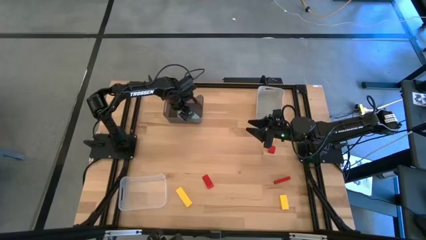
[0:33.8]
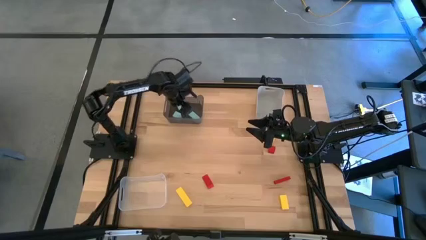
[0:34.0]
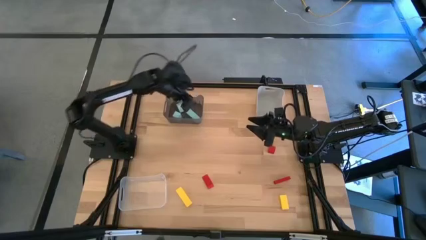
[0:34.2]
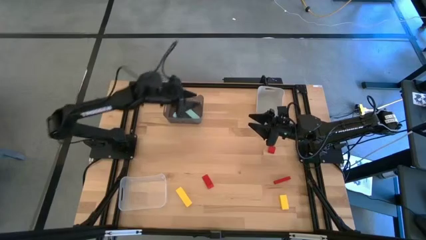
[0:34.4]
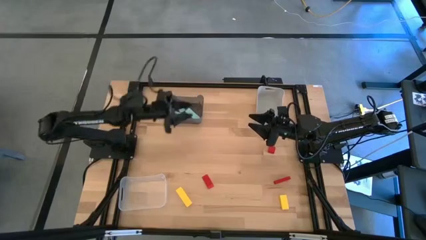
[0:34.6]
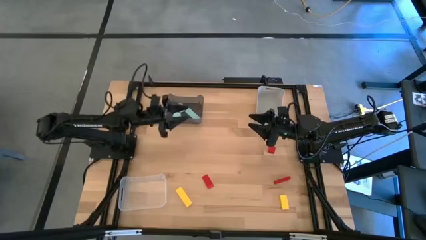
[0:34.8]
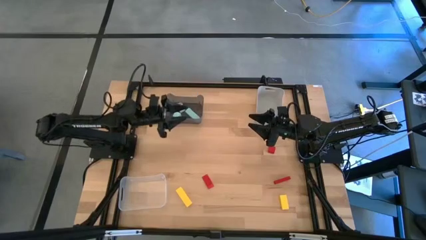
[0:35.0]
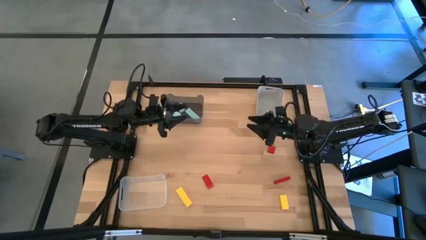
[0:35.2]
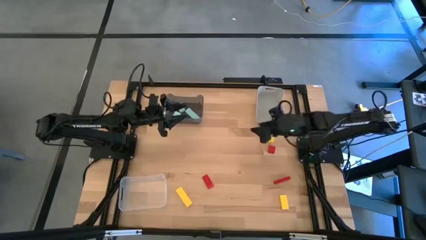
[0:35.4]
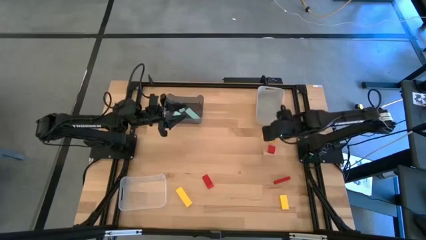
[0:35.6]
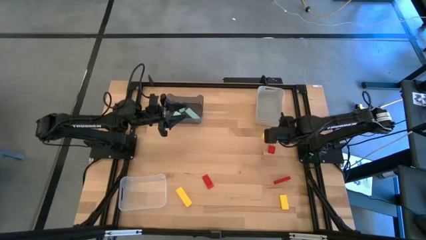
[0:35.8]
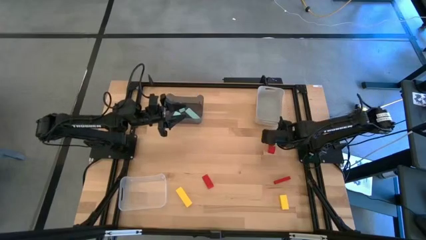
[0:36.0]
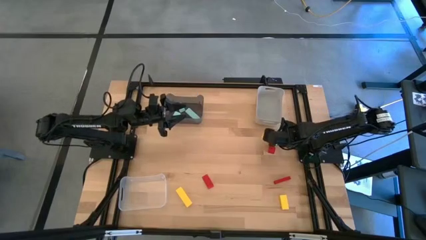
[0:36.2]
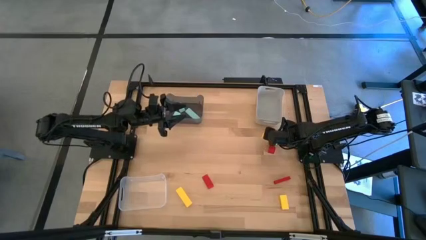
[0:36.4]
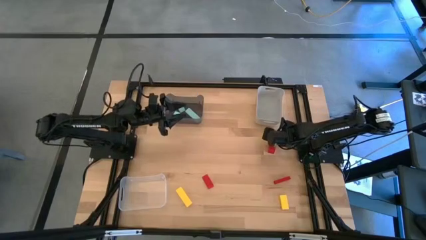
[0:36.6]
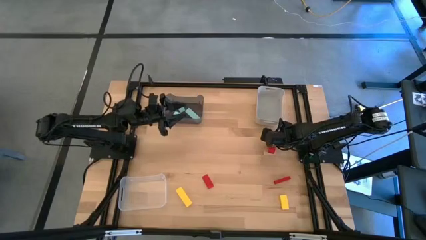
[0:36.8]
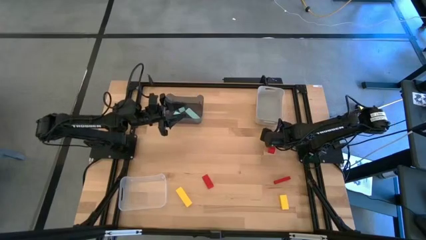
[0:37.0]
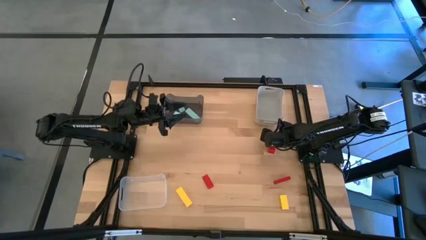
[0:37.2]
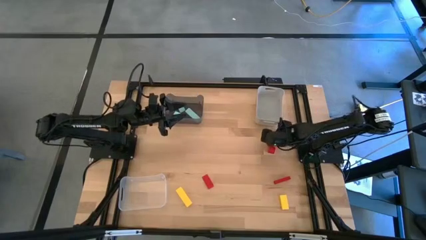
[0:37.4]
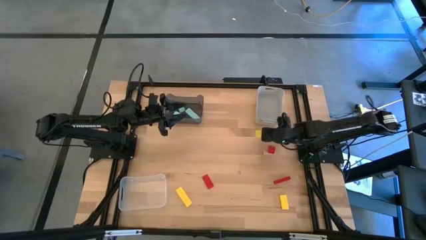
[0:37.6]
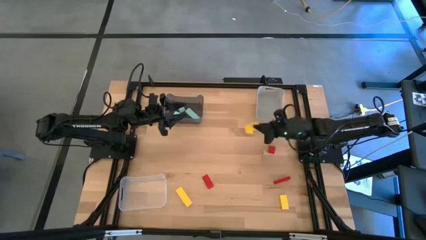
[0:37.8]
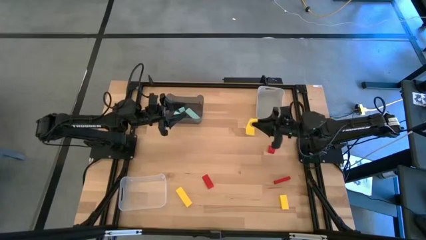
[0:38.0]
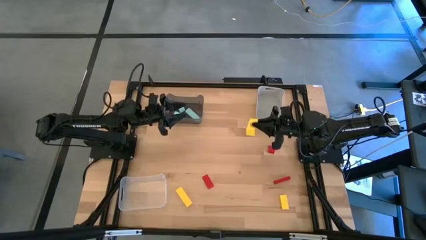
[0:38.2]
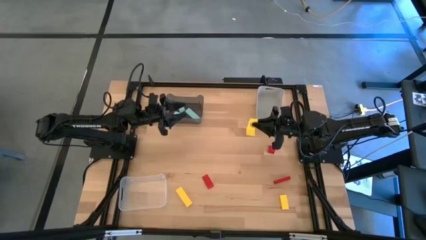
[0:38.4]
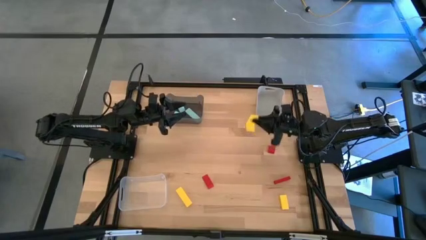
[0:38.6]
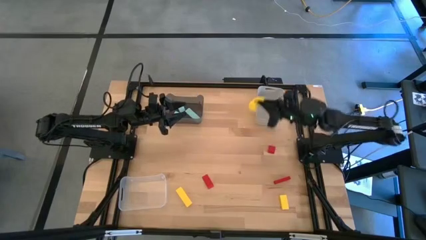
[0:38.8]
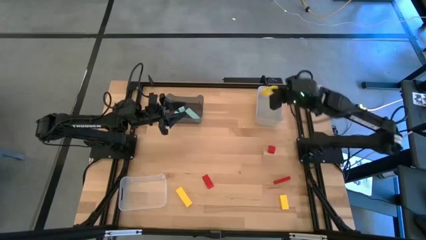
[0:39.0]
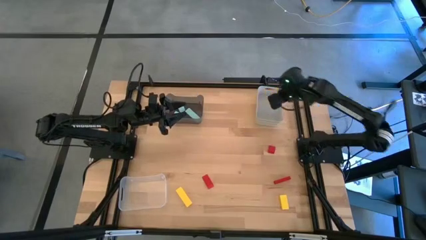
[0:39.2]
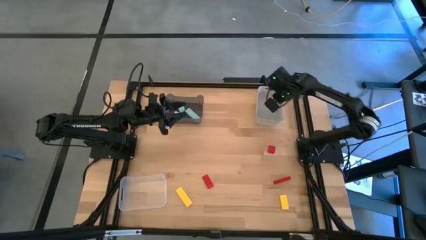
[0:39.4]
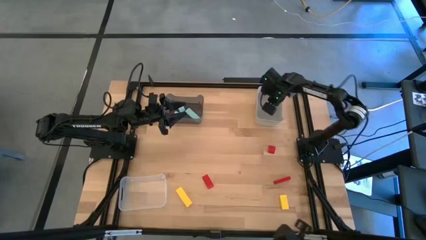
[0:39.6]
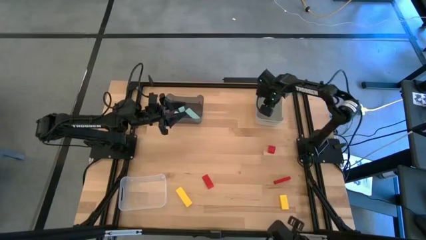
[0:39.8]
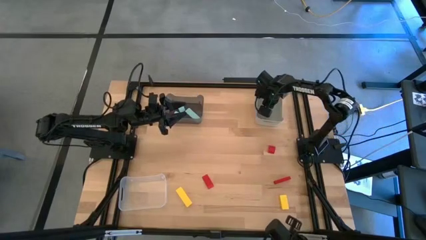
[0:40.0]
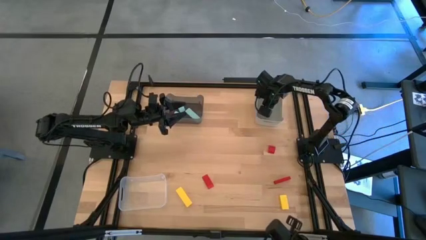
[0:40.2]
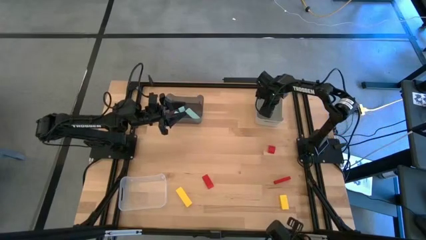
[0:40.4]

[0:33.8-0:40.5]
Task: Sort & place blocks by color
Put the top yellow block into the gray bin

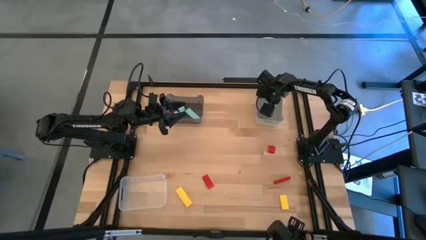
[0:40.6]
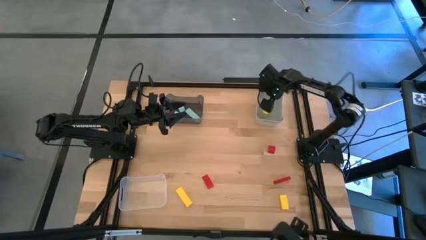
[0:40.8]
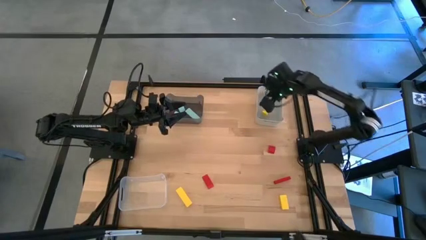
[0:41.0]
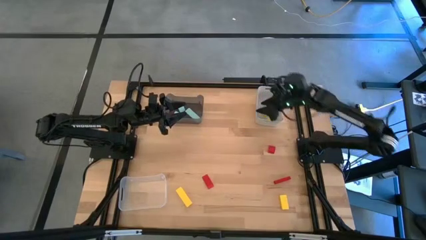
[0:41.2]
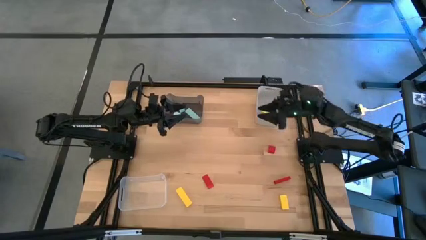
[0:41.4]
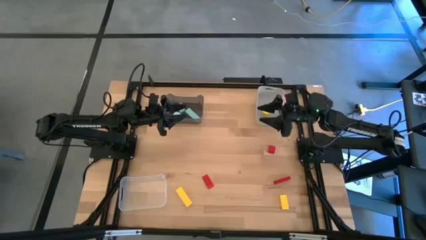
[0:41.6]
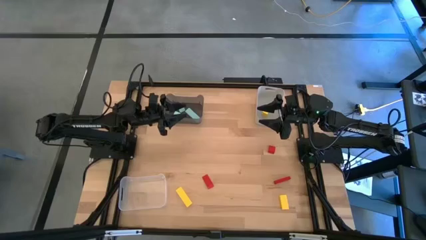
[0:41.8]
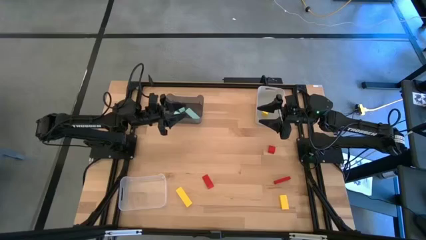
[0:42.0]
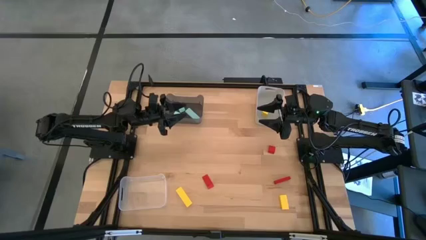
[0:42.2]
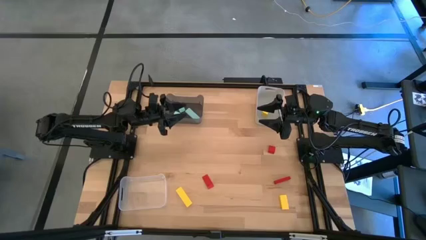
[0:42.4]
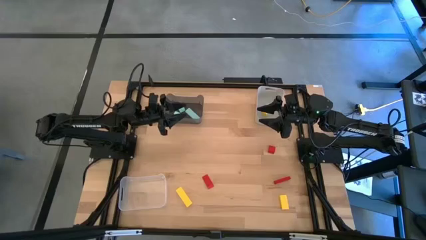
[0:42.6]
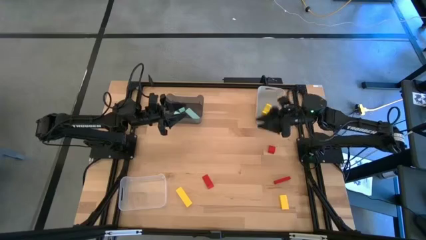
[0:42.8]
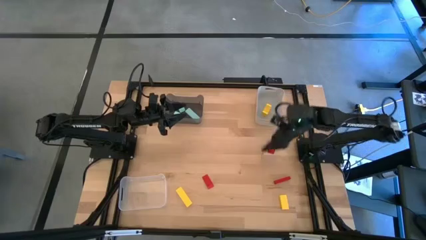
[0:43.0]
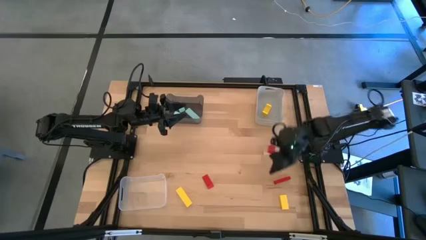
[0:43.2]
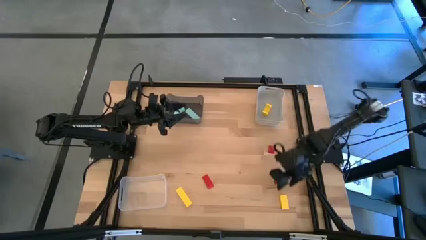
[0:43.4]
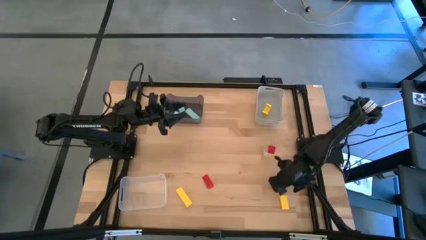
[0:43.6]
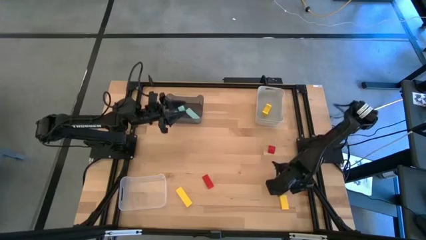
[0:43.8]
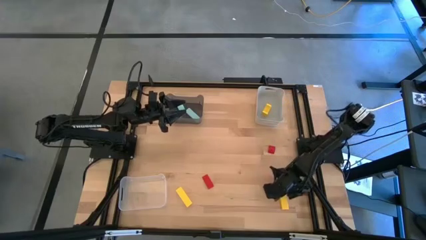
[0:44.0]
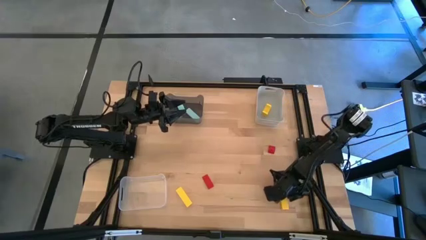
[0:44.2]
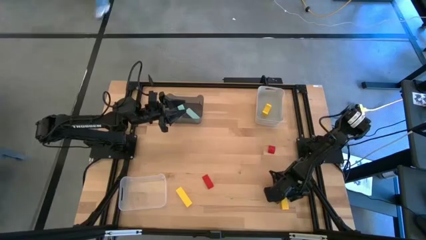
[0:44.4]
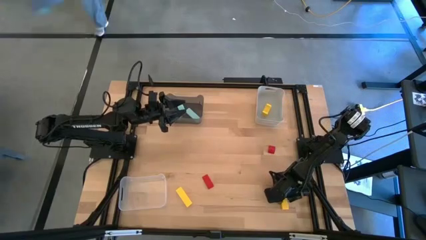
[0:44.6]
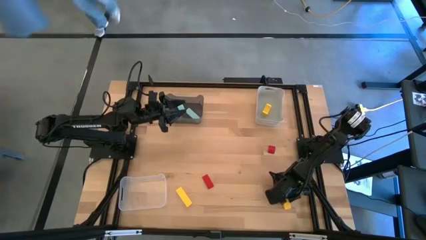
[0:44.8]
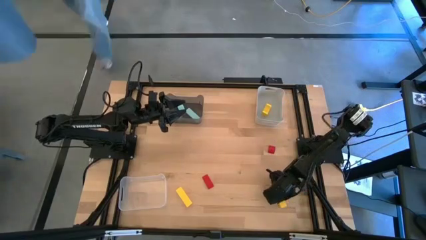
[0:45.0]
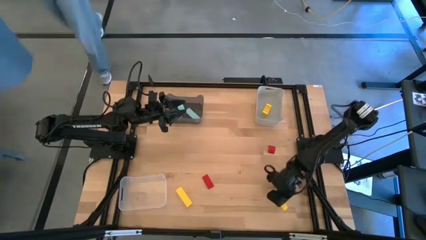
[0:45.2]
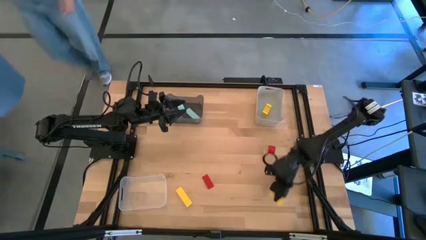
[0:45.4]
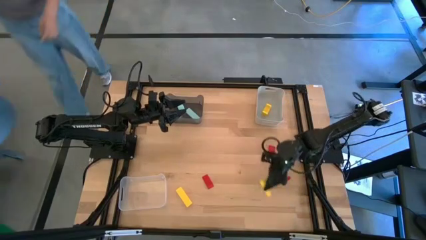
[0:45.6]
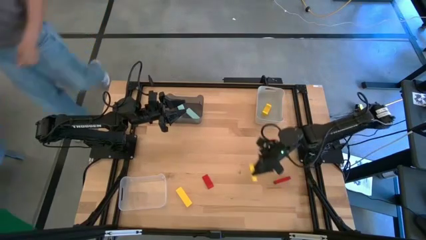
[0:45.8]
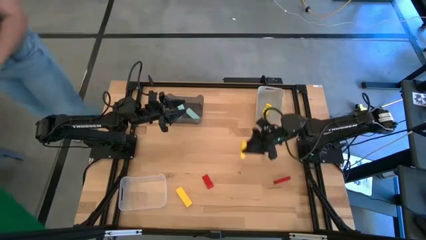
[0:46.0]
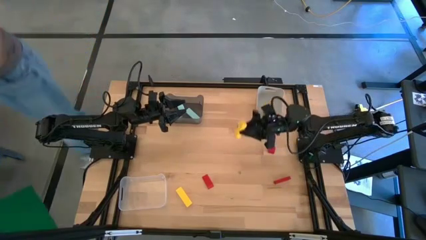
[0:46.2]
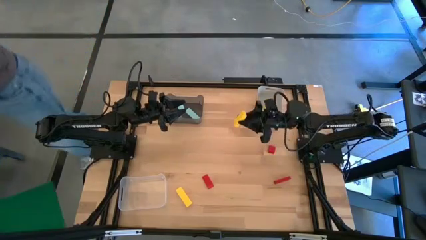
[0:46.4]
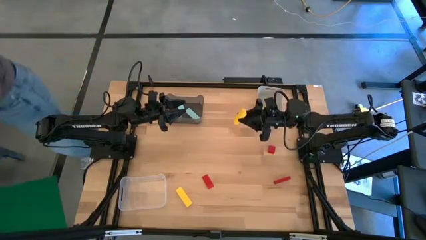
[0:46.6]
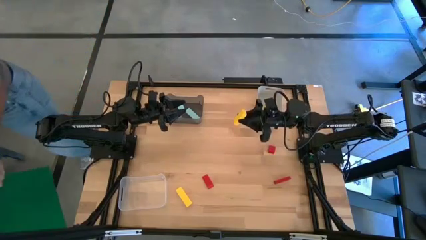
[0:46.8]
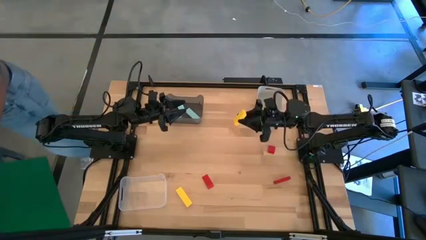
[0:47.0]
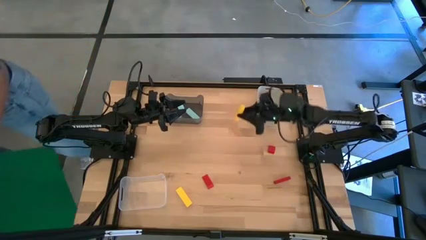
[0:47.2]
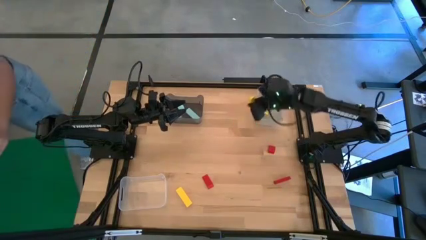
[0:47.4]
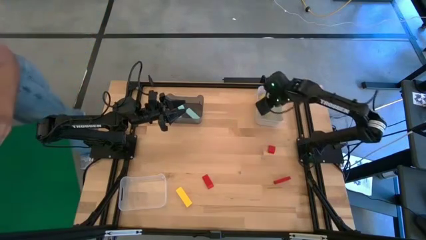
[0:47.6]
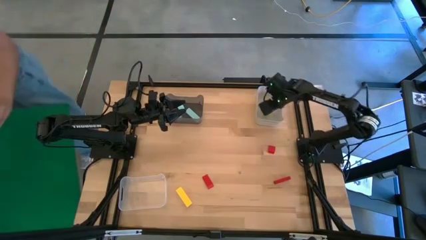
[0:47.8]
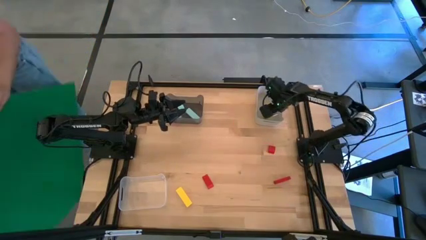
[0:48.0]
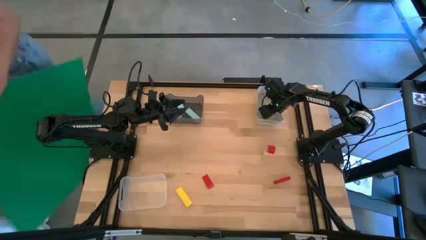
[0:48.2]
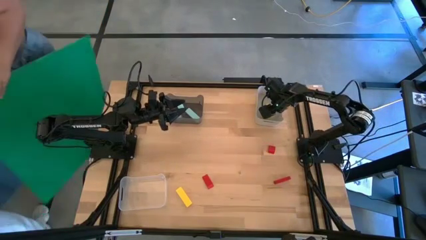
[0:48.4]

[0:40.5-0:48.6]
Put the right yellow block into the gray bin

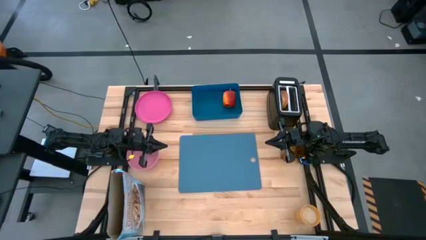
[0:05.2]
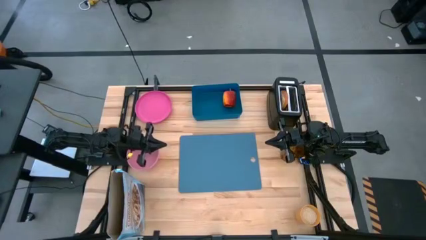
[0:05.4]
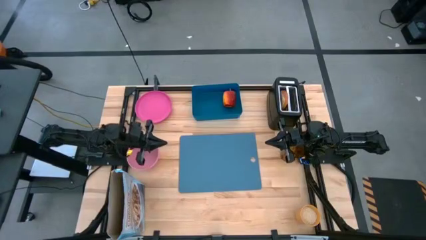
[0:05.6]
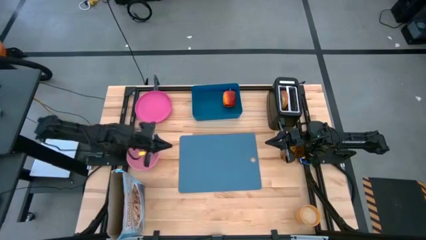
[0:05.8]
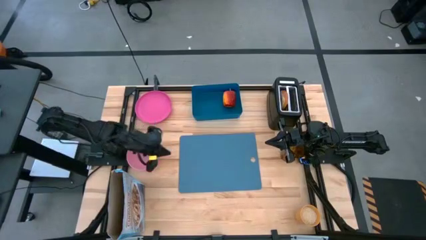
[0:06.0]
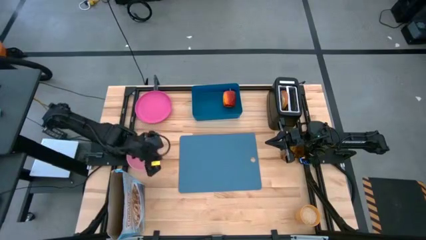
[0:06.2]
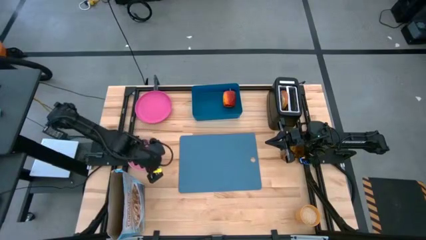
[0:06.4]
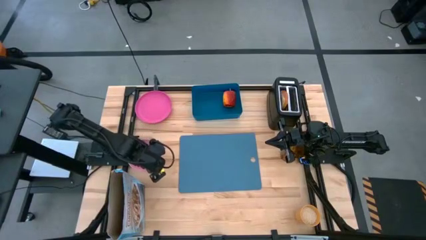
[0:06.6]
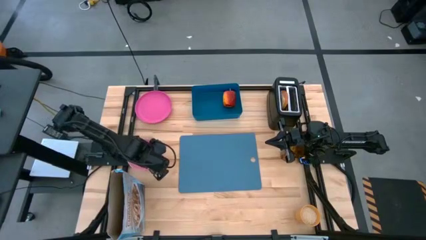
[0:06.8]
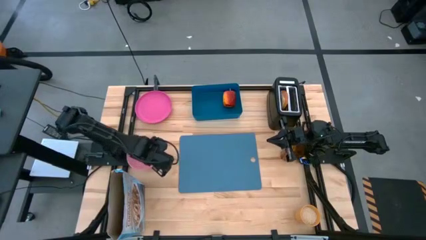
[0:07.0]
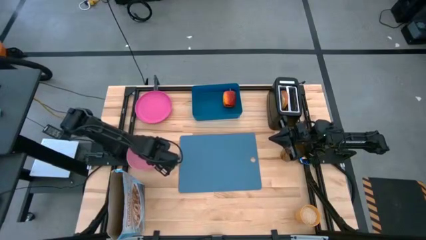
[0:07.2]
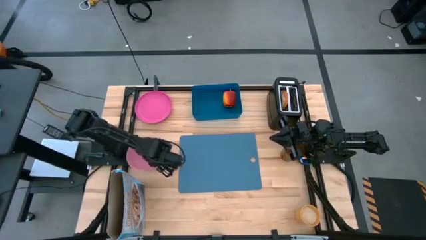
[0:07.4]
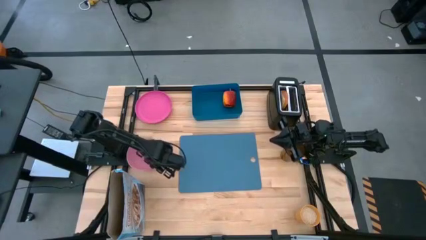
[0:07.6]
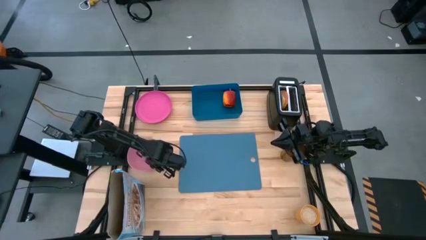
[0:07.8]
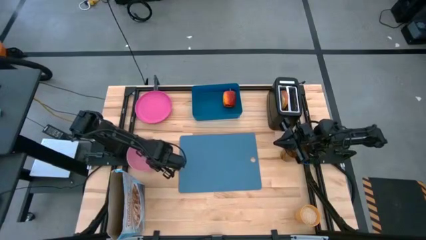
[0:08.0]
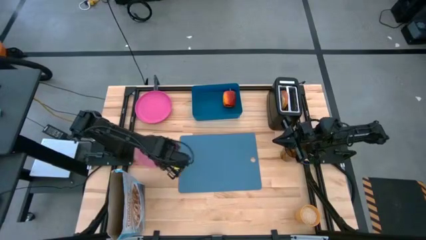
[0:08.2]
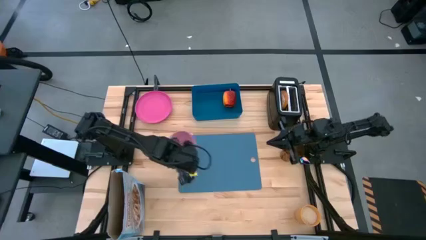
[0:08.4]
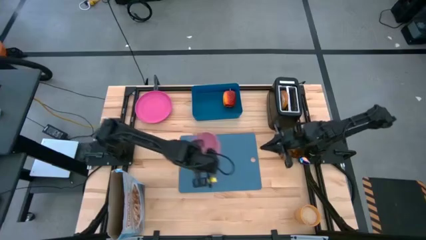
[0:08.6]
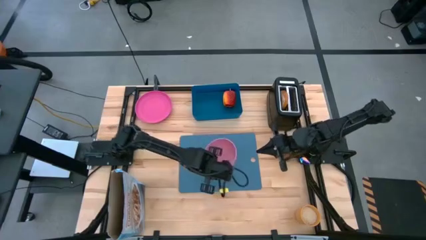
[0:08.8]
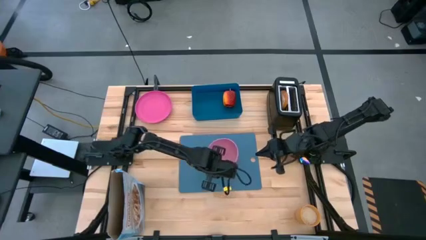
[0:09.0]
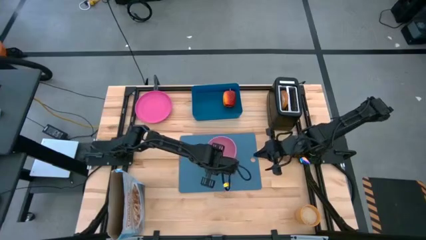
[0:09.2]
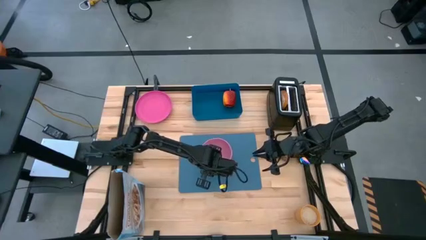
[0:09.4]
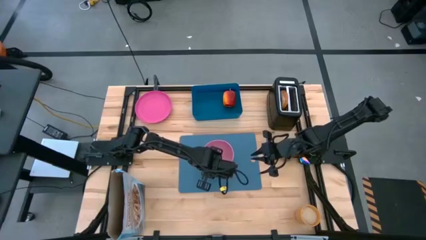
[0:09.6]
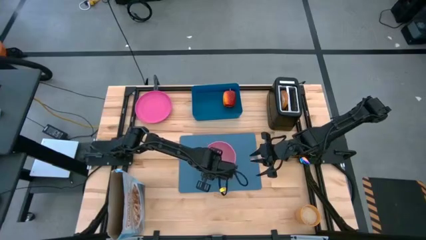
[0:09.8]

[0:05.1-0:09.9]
Task: Arrange a breakfast setting
Put the pink bowl on the middle of the blue tablemat
